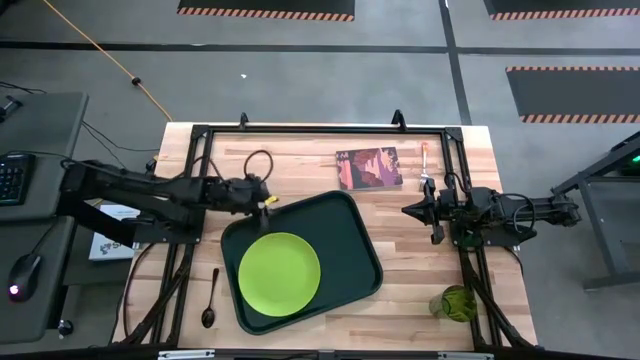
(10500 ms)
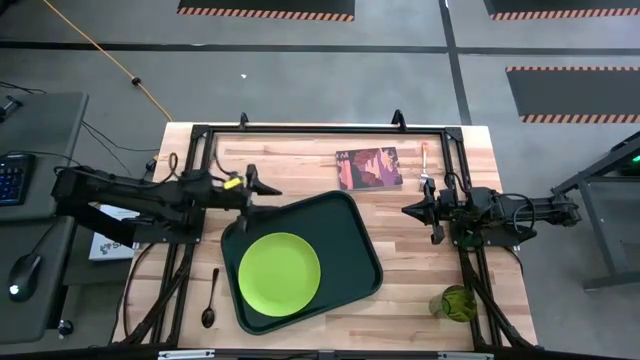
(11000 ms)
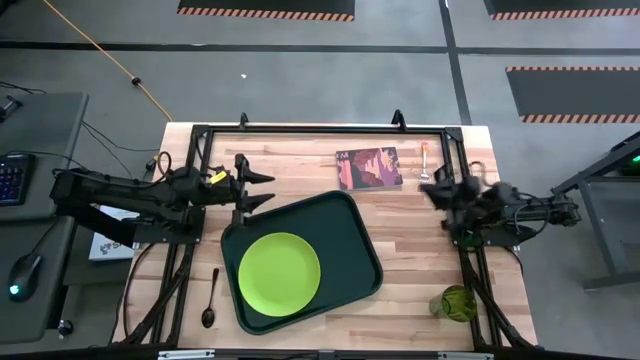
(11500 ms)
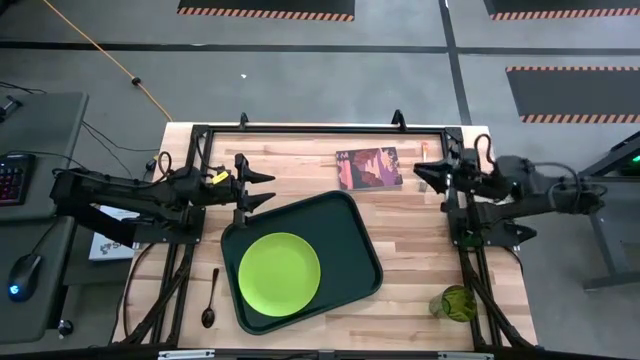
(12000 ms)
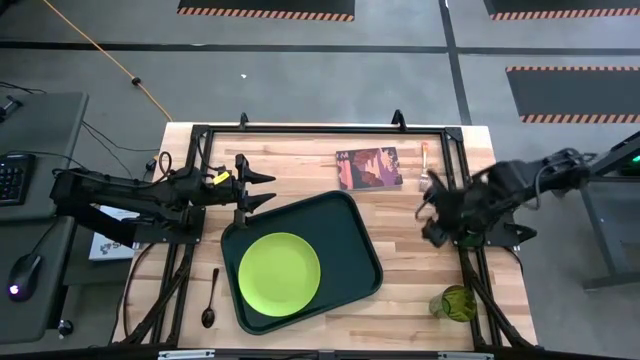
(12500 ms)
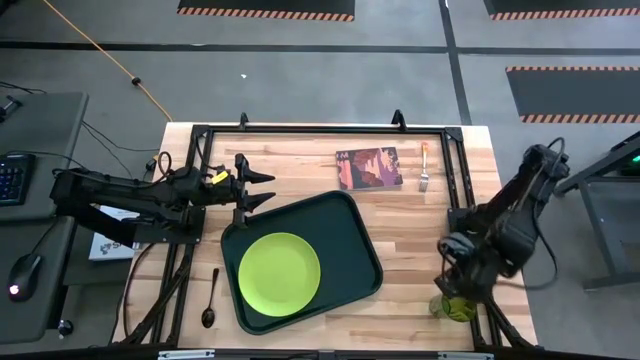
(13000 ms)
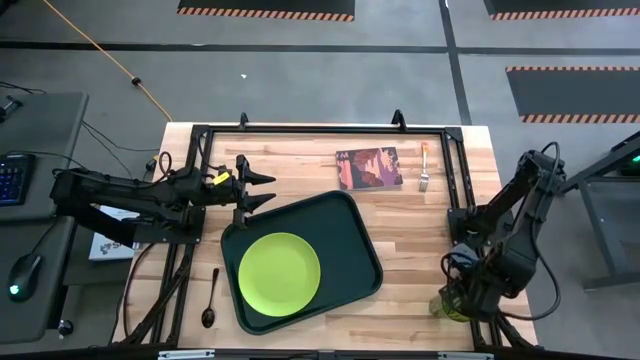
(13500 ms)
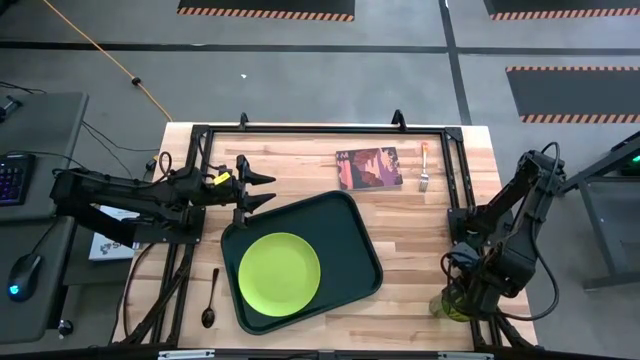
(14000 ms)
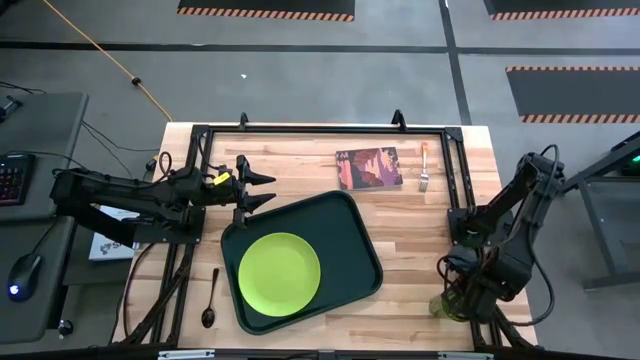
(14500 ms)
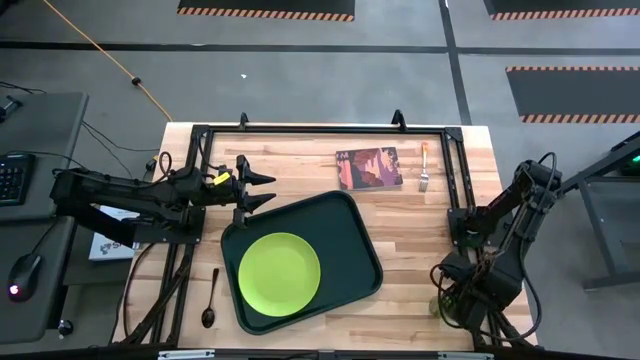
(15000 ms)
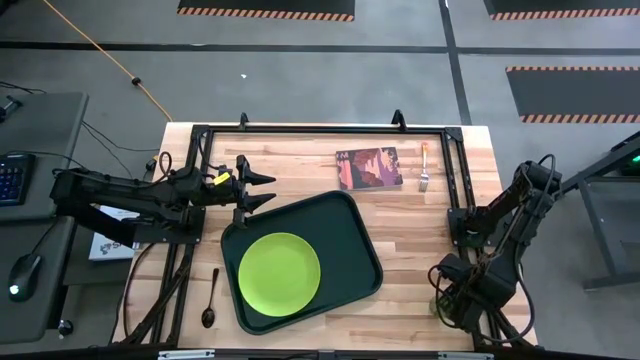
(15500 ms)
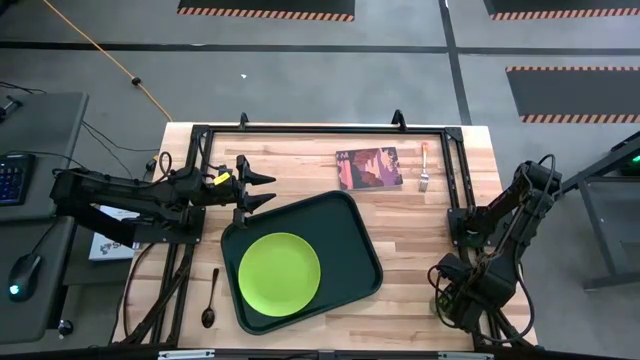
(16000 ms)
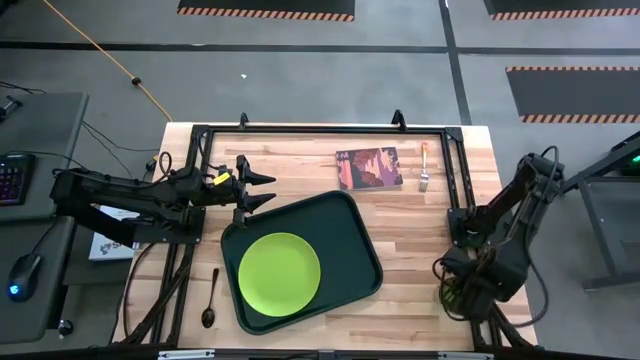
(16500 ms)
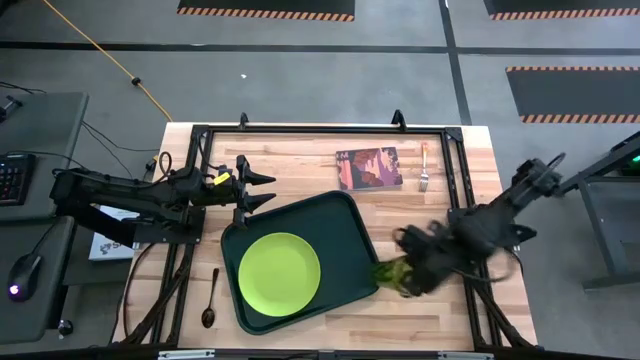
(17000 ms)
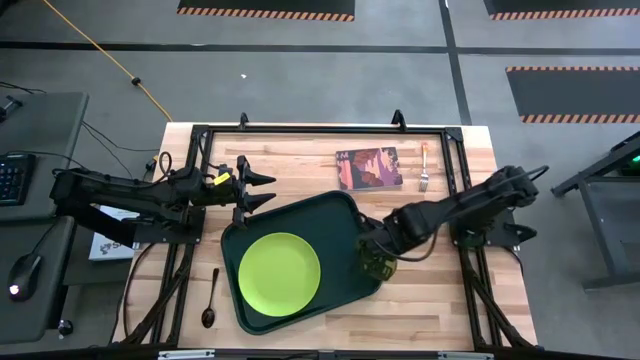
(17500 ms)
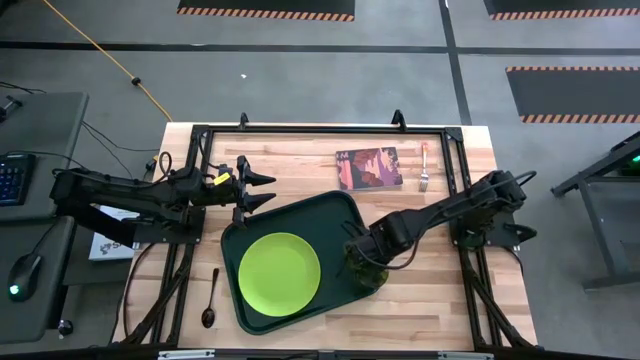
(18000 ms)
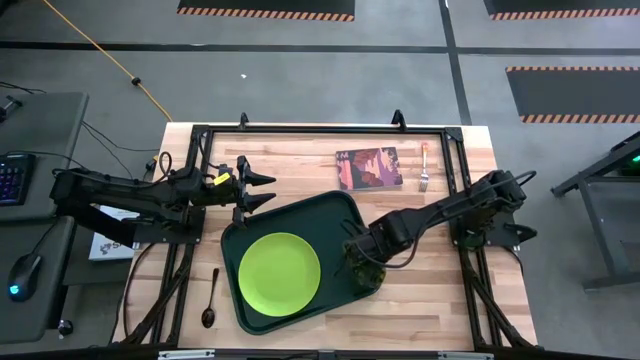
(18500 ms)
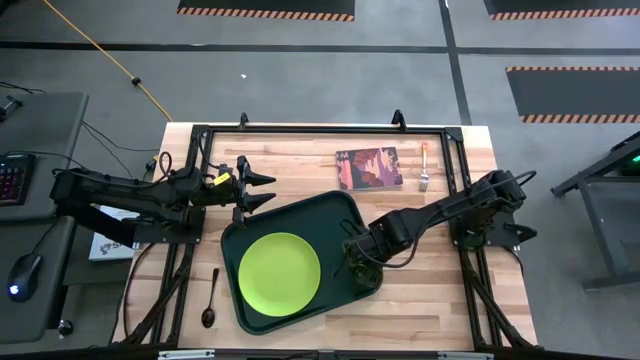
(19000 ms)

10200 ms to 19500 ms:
Task: Pick and place plate/cup/fork/spoon on tray
Put the green cup on the lower right of the black tray

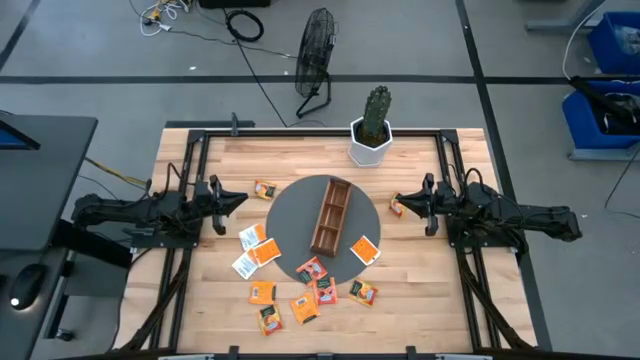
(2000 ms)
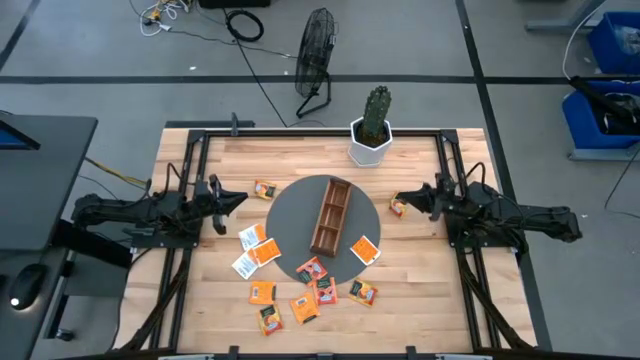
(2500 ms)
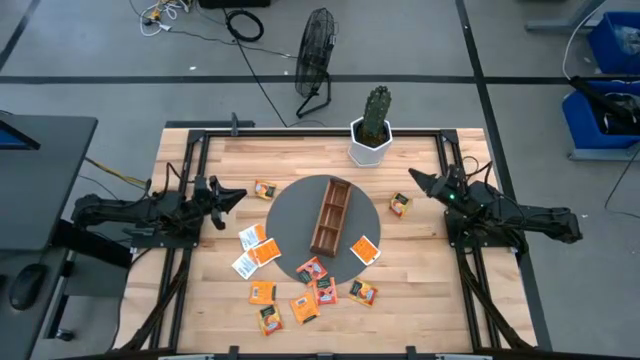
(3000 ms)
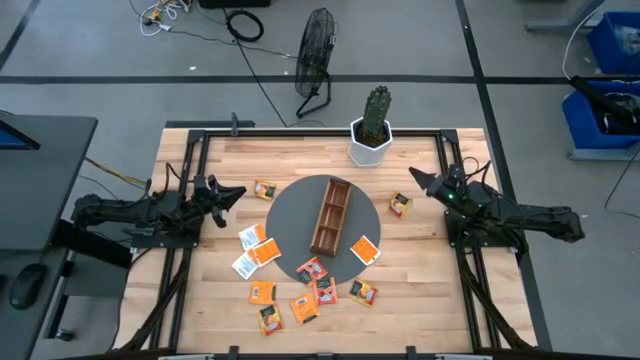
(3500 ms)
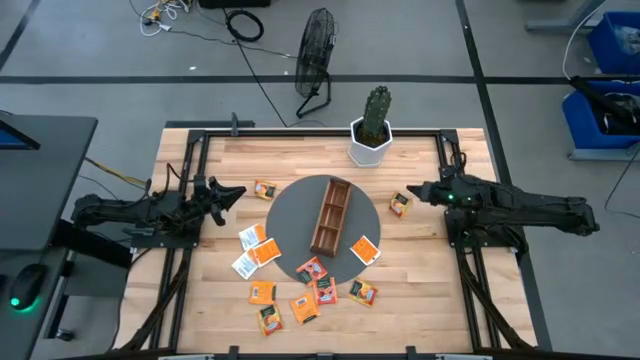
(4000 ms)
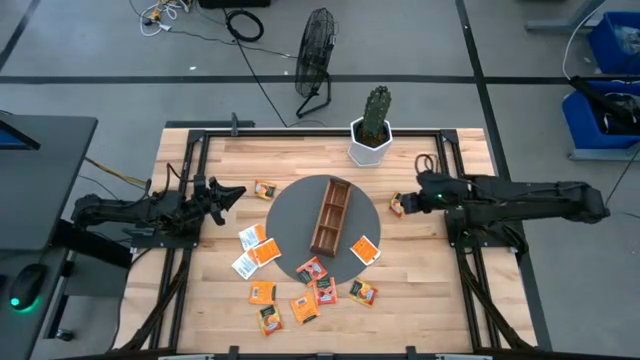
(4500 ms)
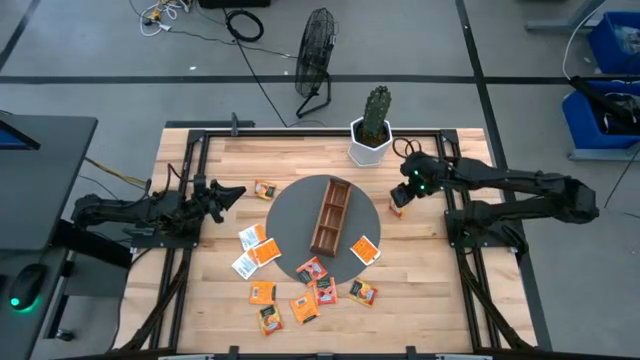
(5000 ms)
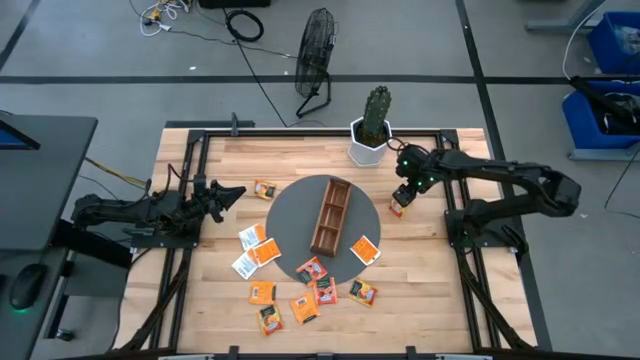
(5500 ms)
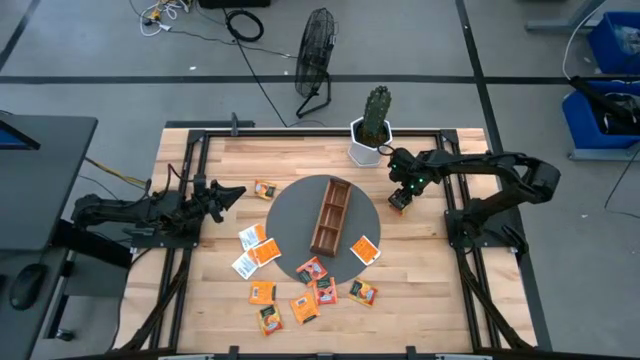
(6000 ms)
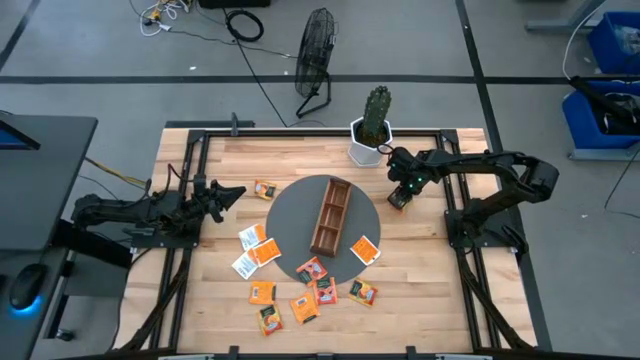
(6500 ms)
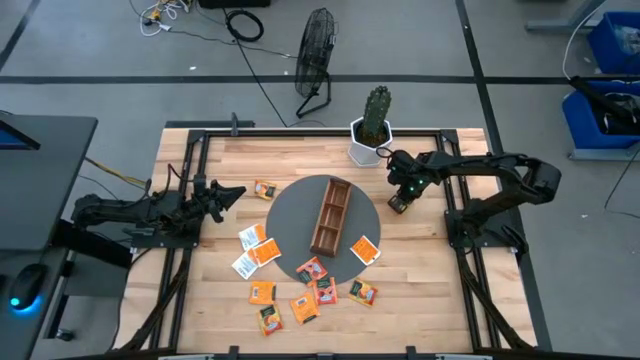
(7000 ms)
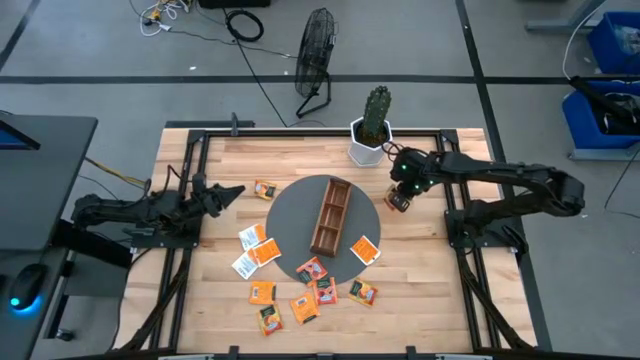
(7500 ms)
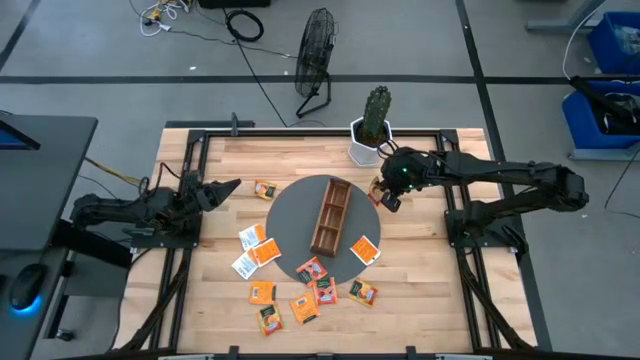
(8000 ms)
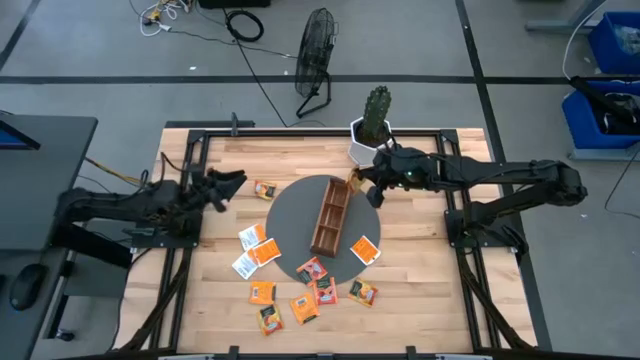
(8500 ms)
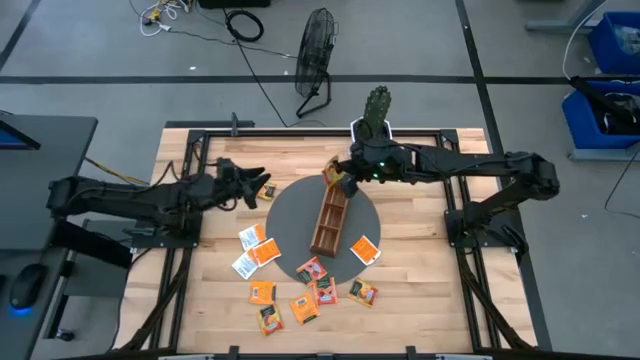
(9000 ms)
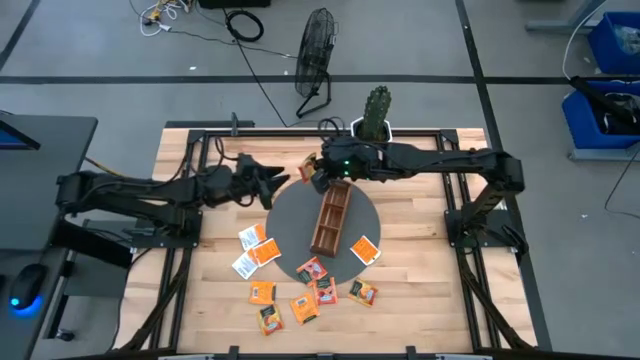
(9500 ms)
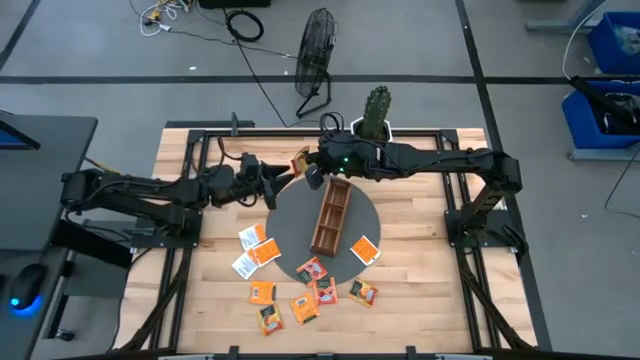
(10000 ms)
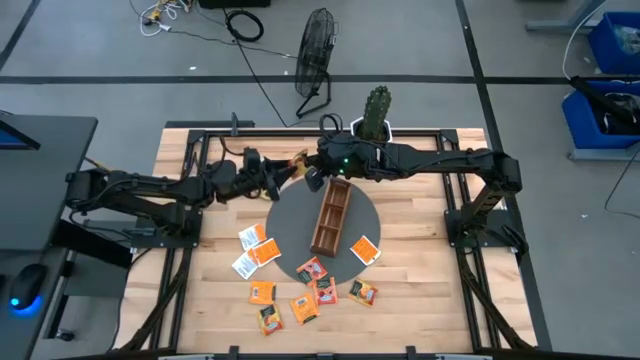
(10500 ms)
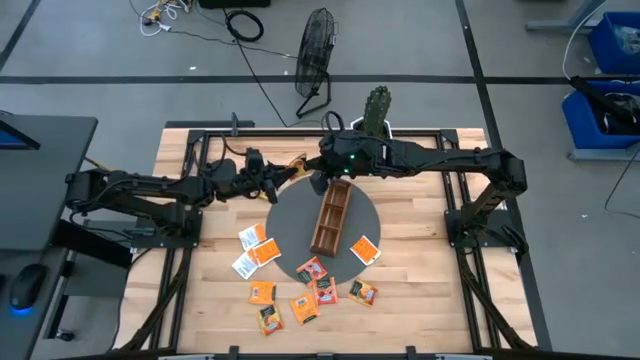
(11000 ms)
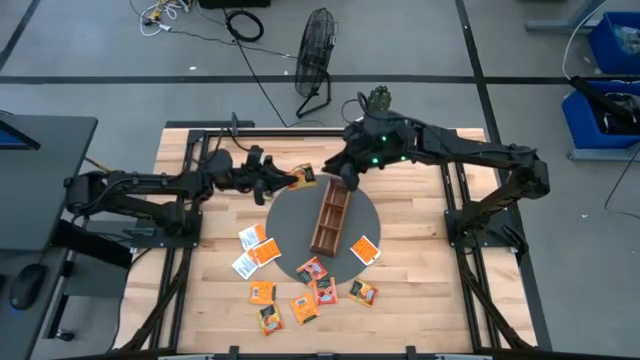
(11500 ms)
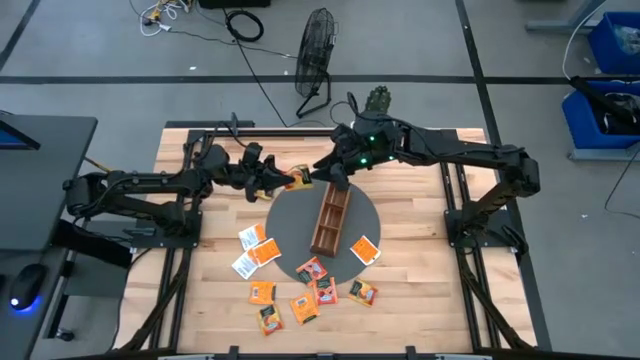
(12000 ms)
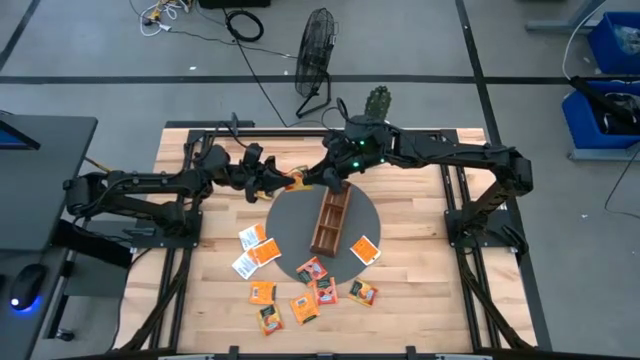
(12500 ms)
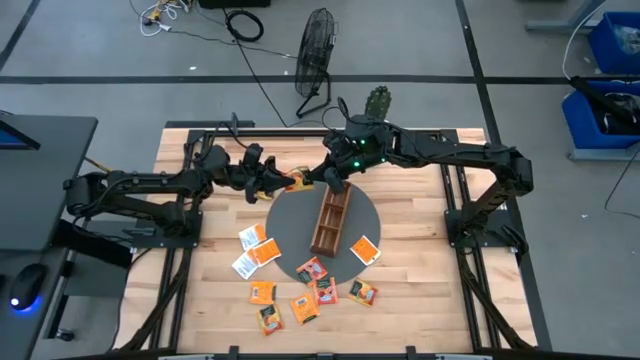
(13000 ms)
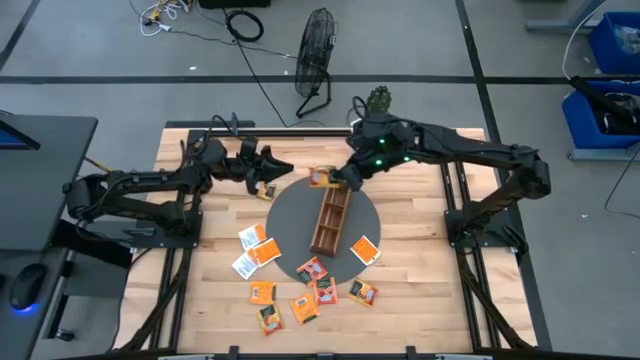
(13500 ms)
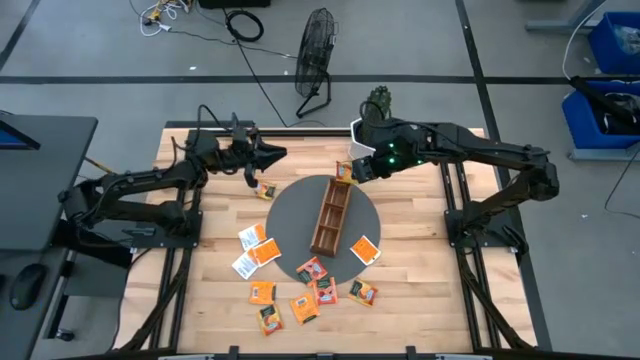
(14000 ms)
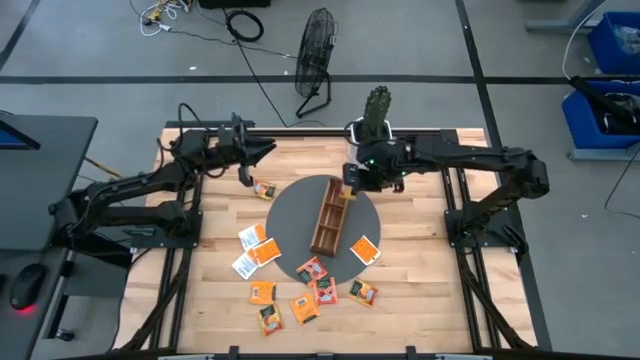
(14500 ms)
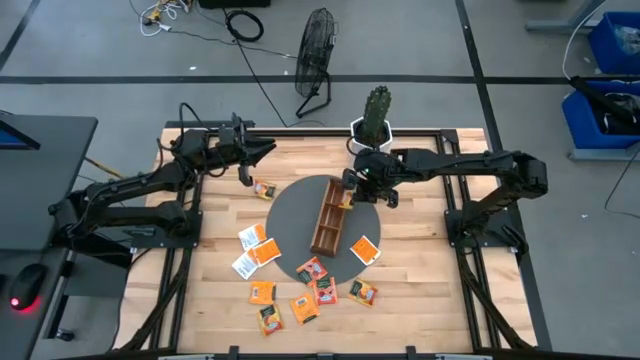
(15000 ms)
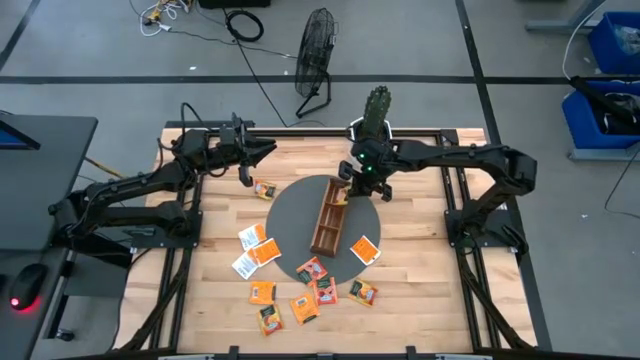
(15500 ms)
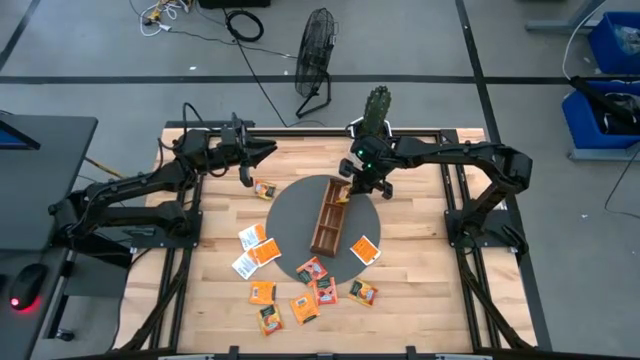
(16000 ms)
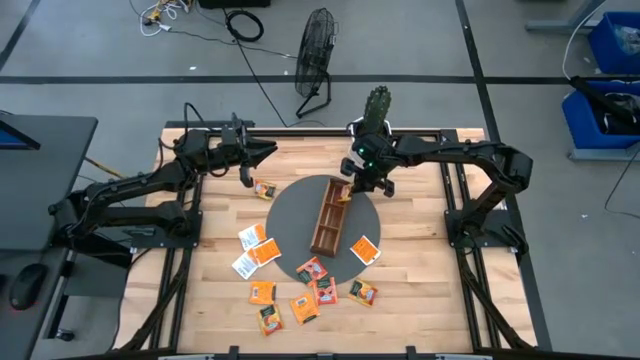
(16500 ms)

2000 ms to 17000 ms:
Task: Pick & Place Tea
Put the orange tea bag into the top section of the wooden organizer
